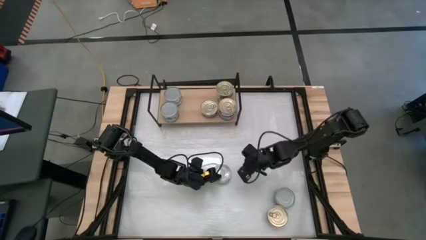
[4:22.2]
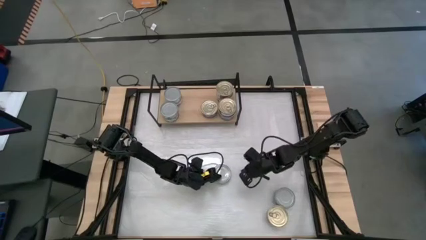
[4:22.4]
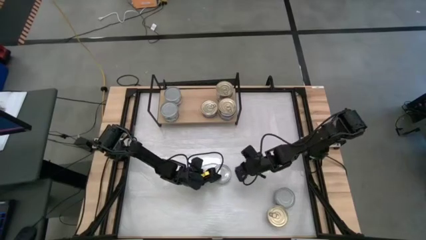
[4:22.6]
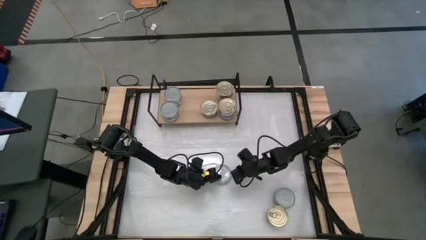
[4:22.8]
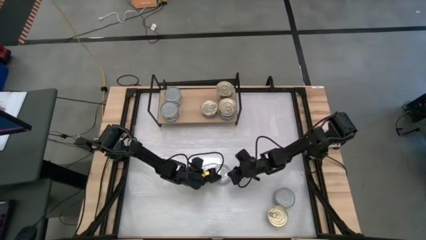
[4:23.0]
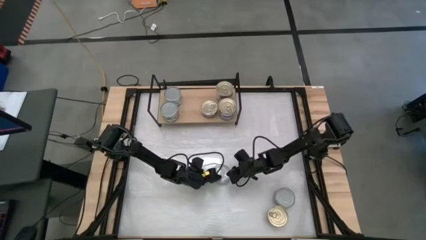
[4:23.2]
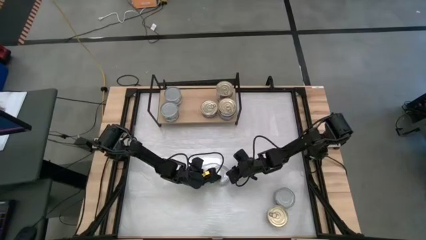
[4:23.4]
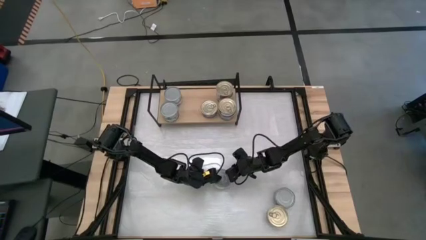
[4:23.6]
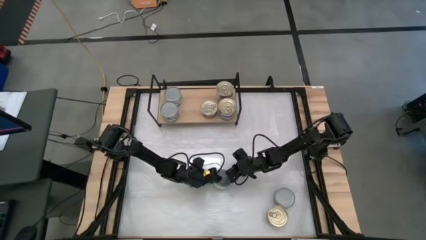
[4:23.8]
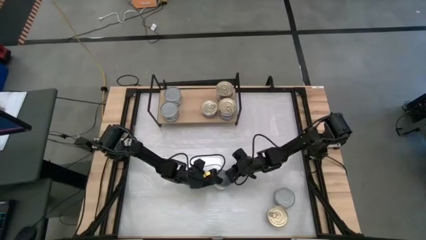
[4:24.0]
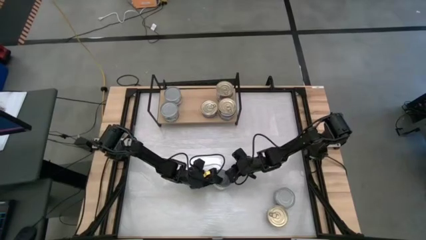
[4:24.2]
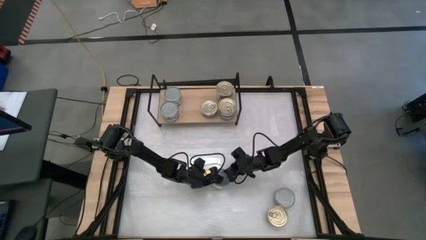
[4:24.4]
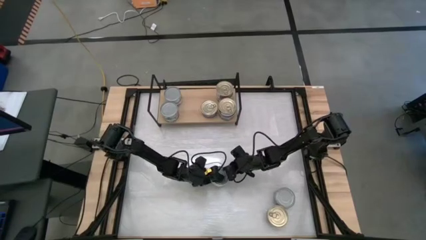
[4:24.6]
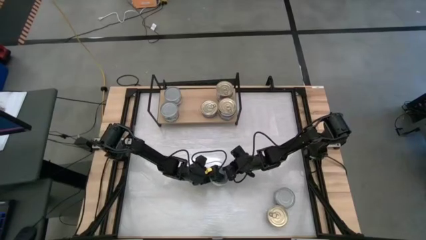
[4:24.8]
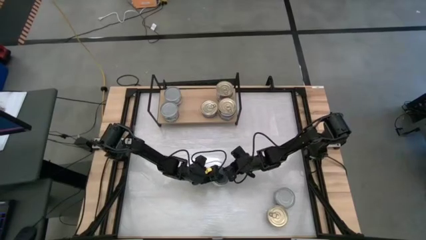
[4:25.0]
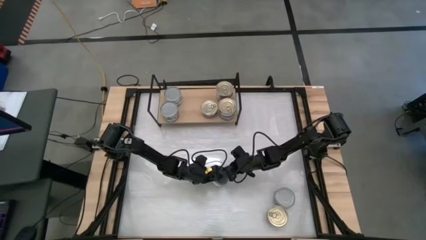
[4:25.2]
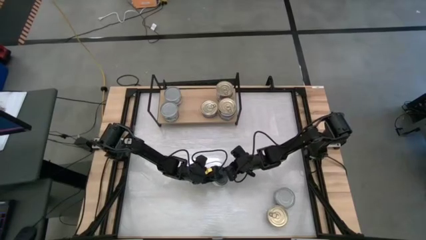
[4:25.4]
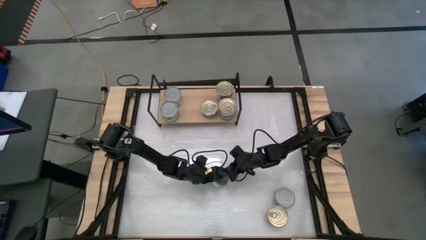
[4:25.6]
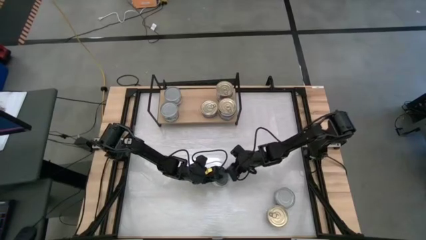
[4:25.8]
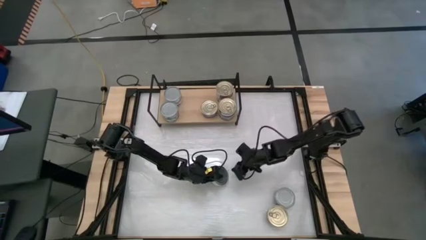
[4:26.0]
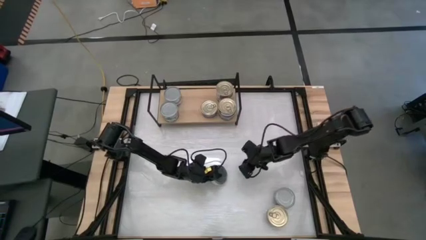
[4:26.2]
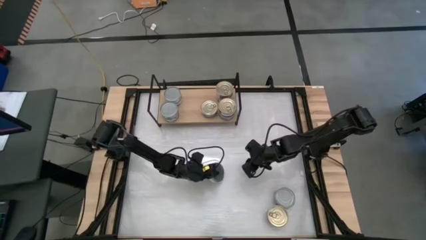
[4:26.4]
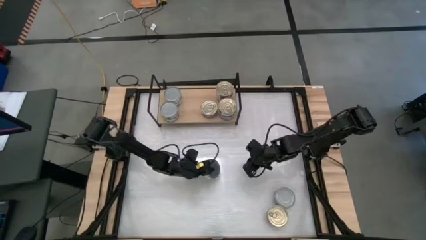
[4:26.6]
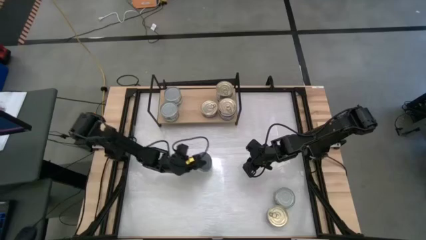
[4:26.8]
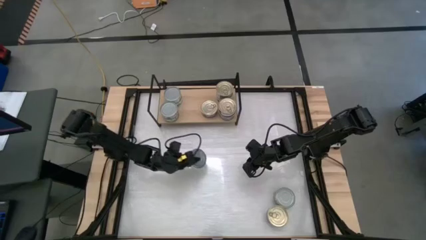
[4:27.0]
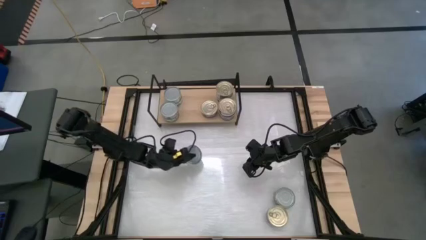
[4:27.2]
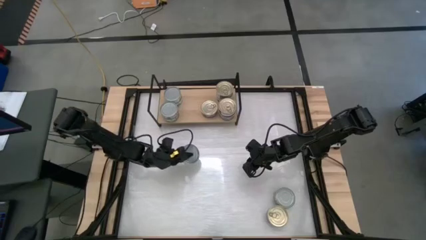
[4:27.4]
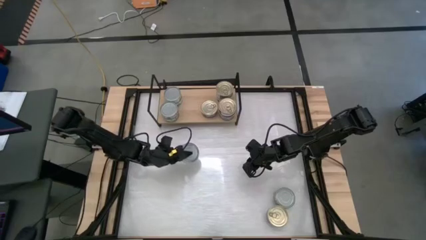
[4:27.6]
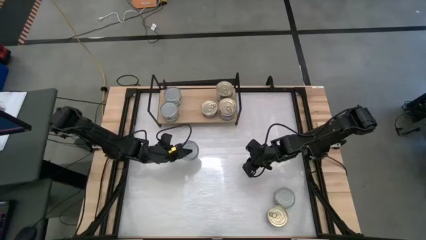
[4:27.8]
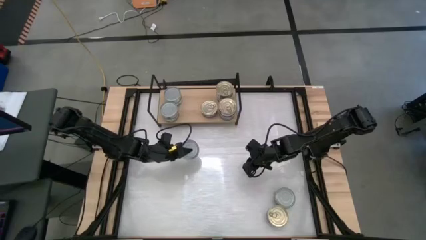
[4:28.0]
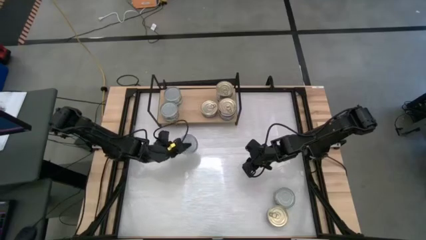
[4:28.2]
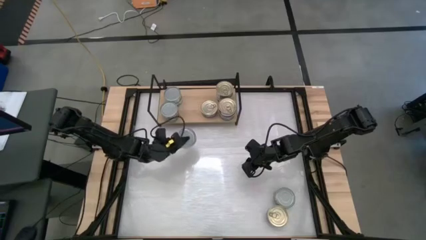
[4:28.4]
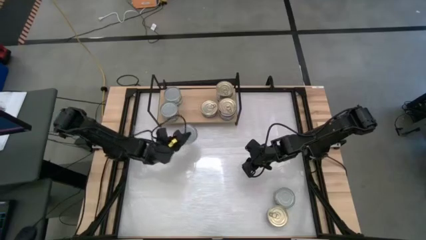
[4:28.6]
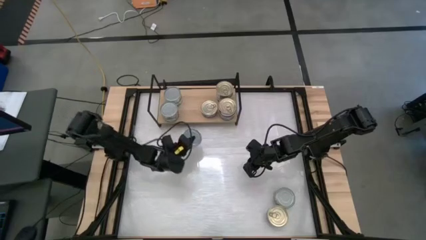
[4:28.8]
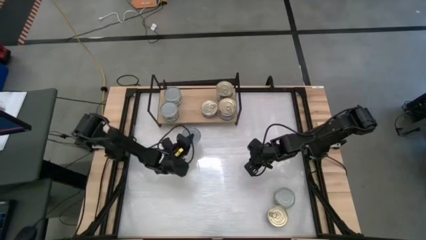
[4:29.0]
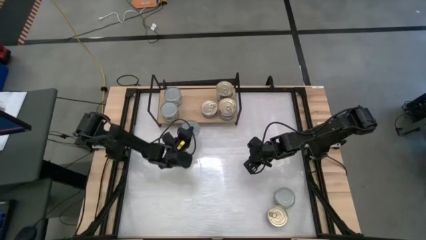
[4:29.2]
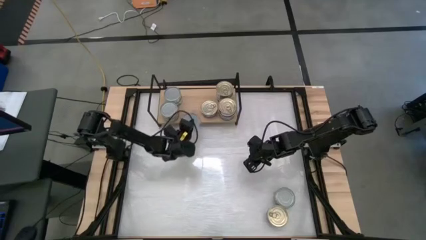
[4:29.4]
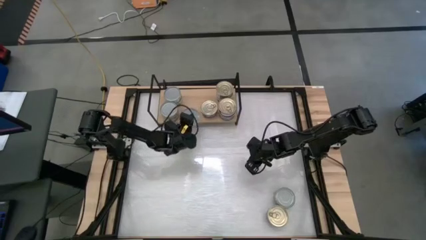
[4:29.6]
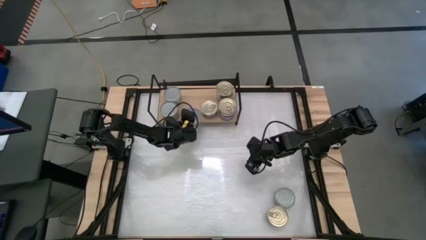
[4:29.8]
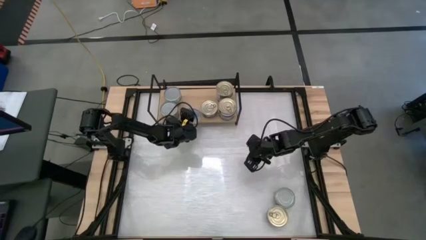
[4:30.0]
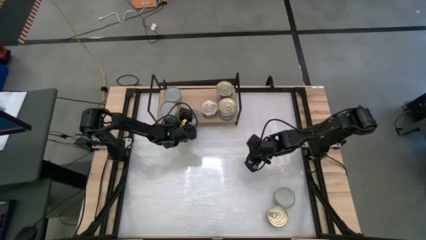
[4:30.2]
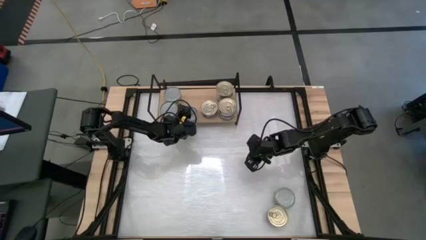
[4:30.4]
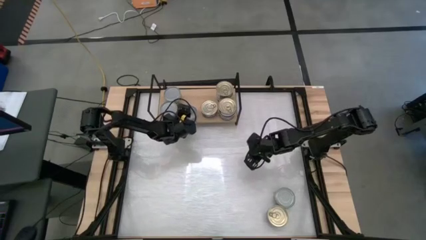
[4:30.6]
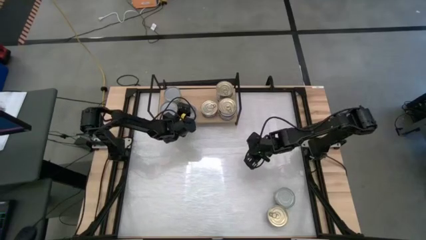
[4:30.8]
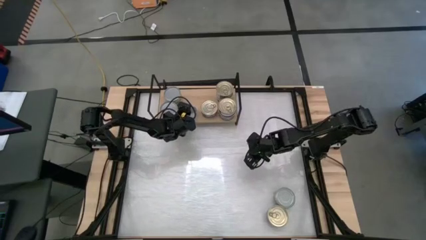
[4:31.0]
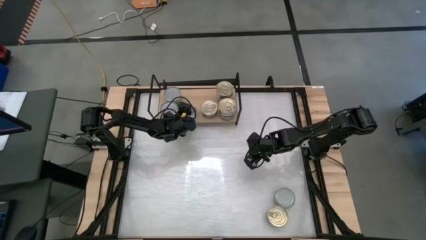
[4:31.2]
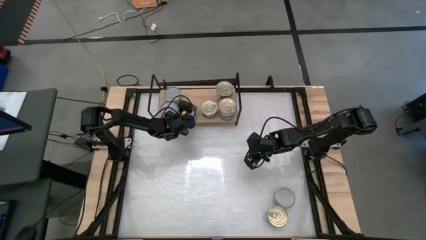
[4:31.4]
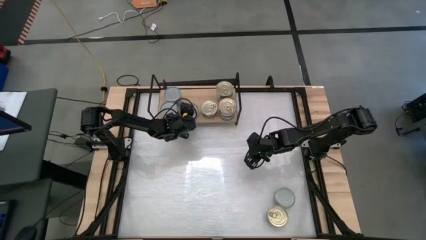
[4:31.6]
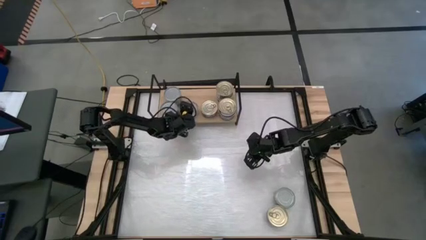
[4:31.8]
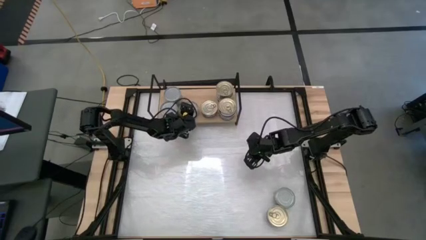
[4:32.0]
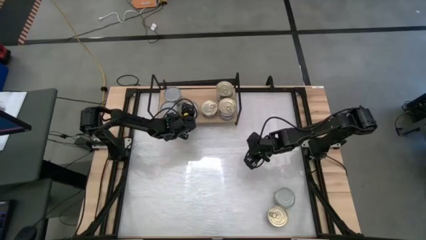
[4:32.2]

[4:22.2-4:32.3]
Task: Stack canned seafood by type on shelf
Put the green tuna can on the shelf

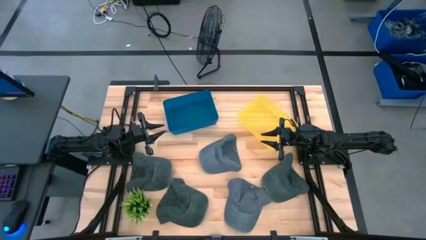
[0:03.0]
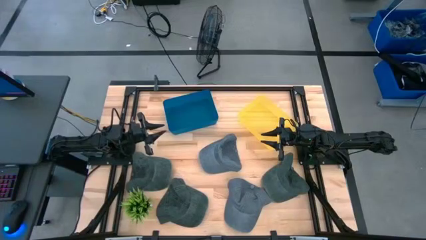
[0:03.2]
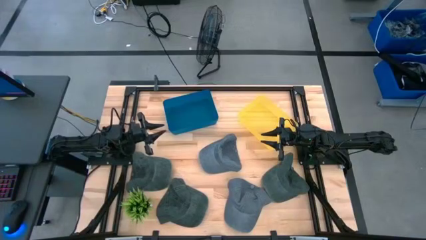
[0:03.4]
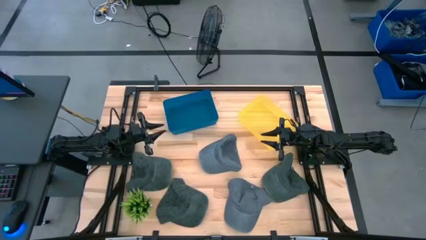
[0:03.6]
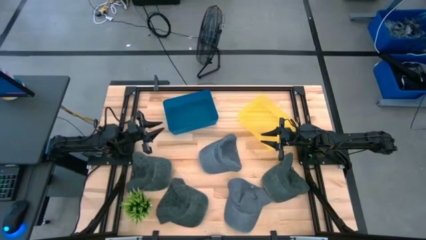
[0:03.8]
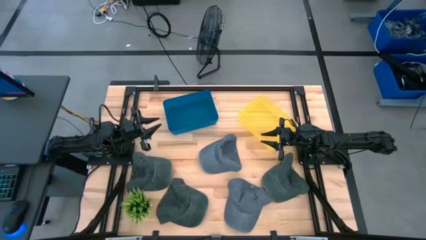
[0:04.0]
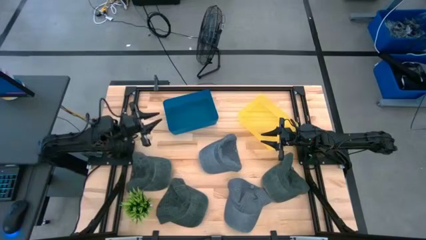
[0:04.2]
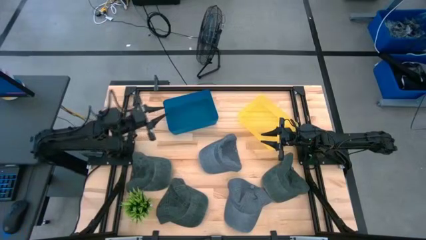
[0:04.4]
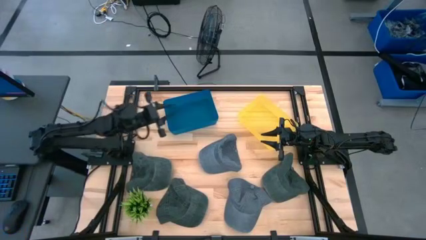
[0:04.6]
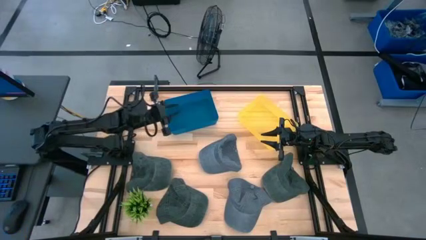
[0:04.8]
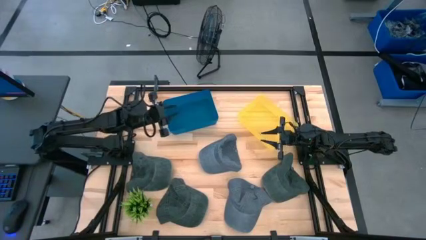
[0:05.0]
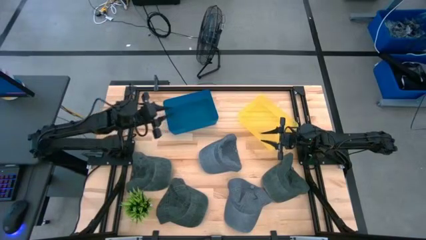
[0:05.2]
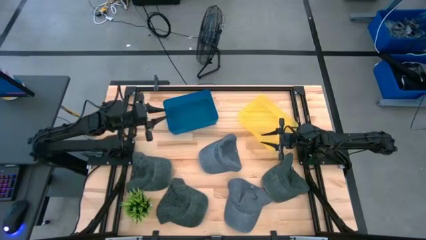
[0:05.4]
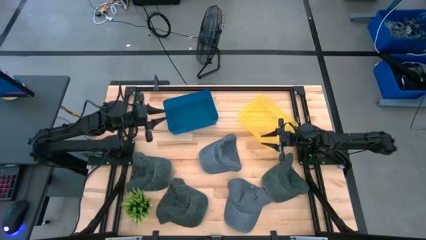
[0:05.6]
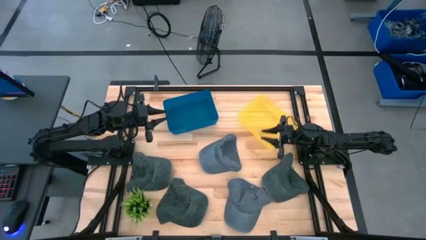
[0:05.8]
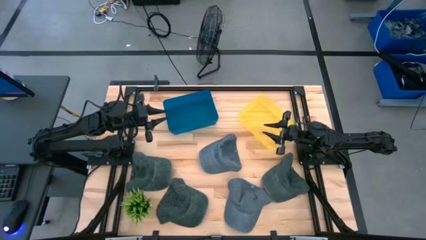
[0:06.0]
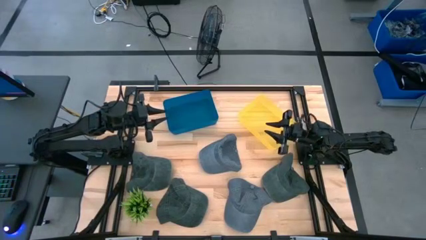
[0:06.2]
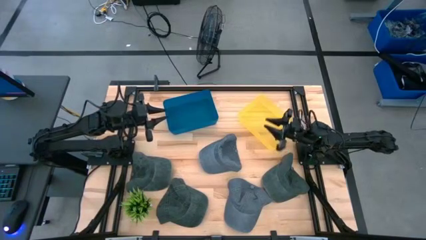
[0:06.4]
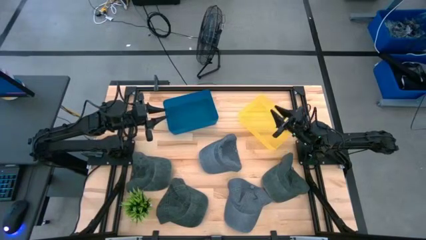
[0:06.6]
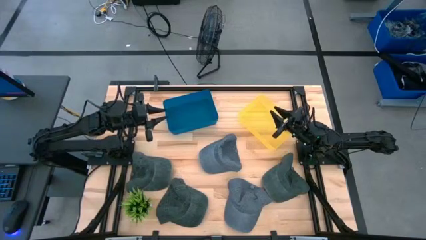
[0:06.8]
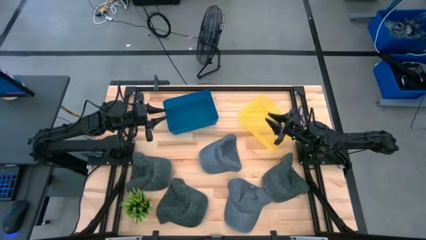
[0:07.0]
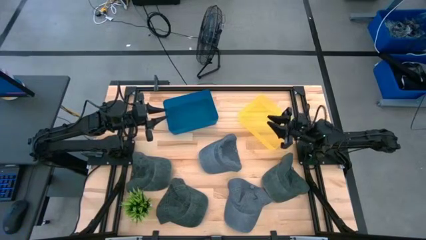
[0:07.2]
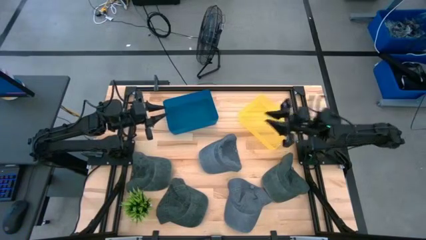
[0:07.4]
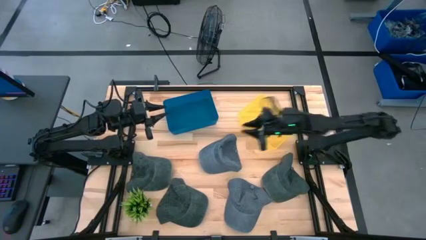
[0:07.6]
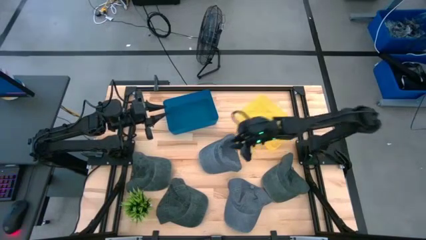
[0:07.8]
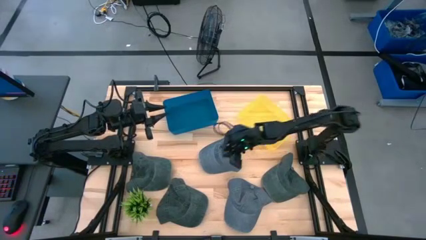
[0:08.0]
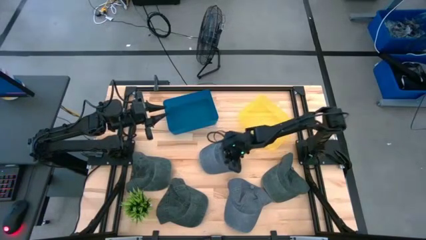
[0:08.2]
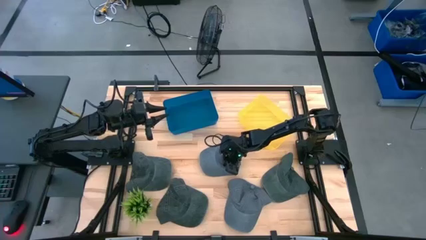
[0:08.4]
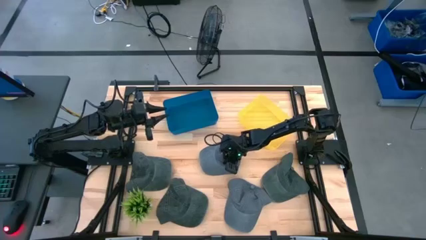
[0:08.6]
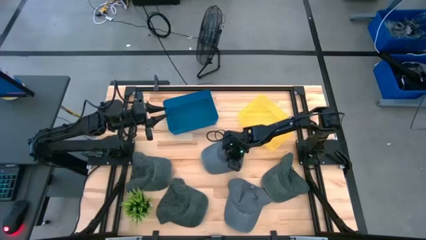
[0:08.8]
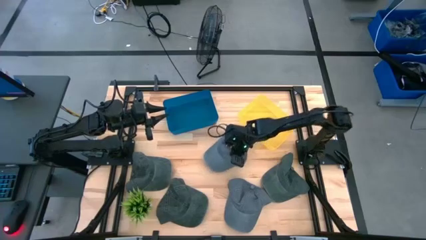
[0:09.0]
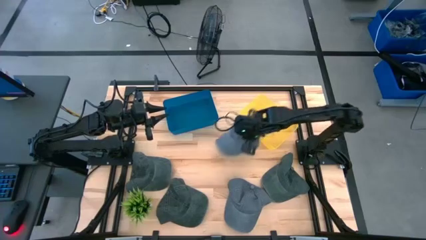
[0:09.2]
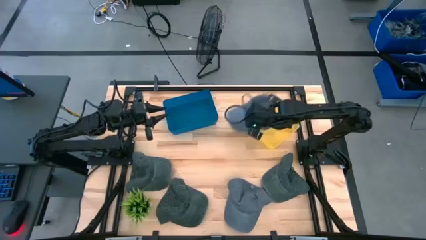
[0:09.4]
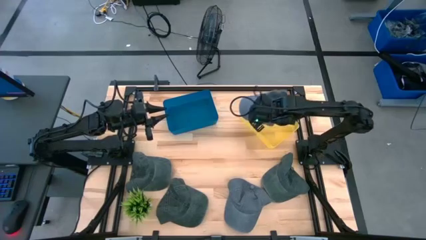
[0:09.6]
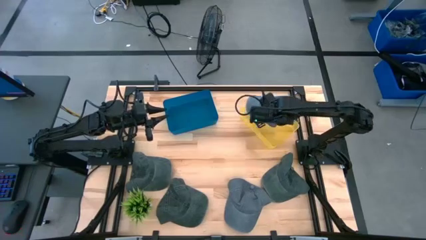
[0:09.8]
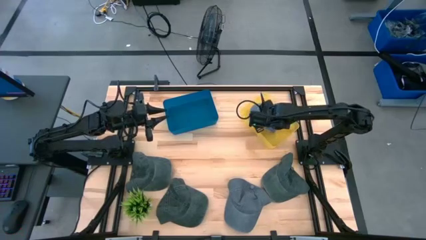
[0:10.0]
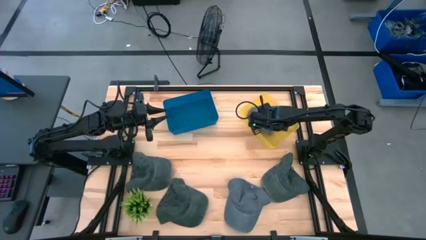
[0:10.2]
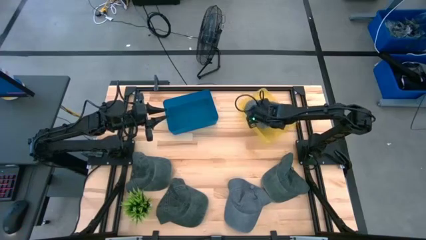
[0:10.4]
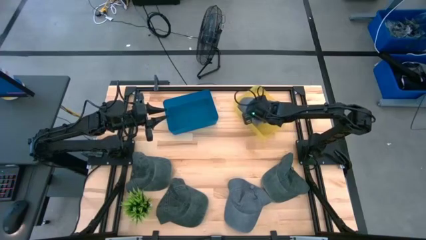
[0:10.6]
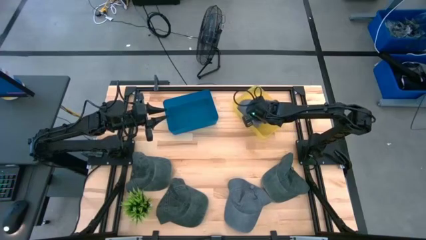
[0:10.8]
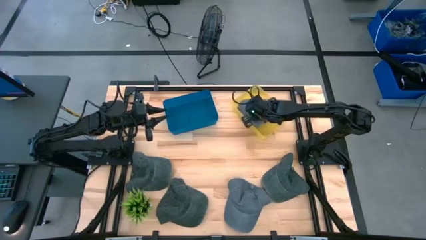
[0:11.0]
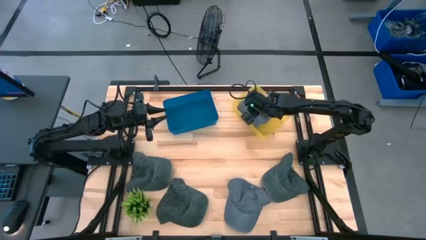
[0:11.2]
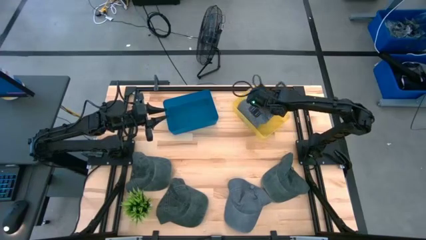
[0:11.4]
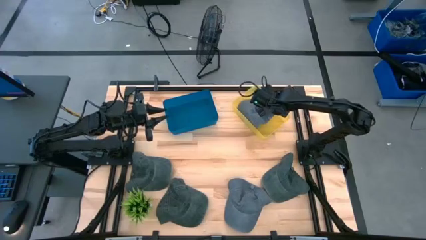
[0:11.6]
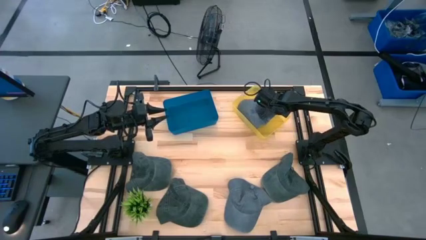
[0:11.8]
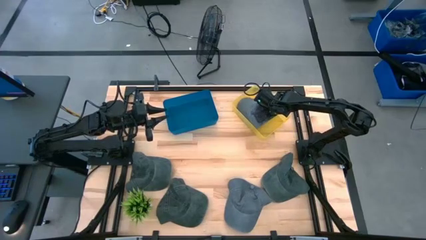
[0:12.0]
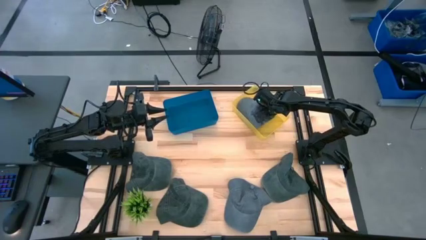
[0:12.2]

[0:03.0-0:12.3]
Task: Pick & Place hat
Put the top blue cap into the yellow bin
